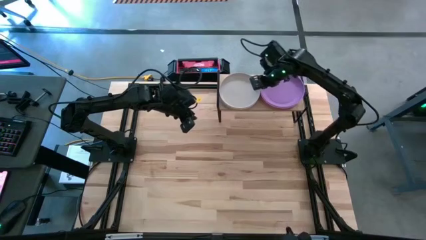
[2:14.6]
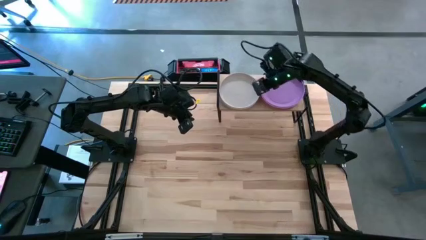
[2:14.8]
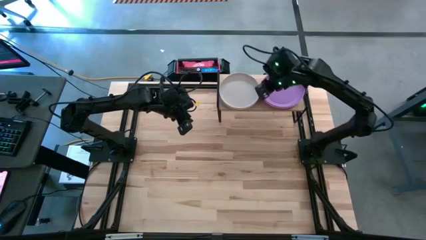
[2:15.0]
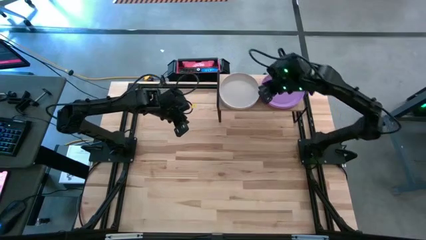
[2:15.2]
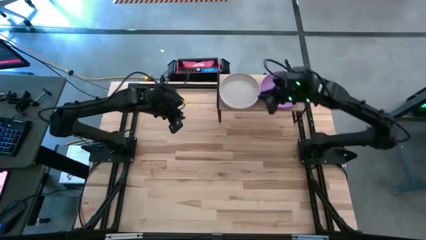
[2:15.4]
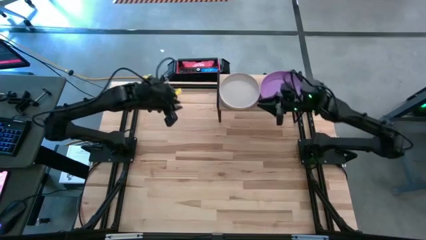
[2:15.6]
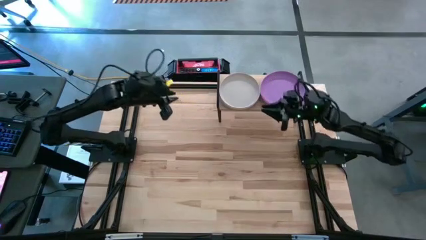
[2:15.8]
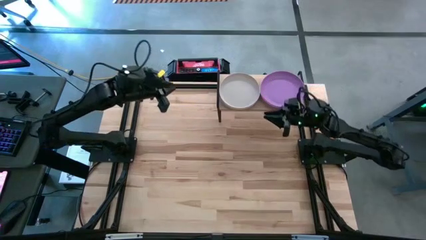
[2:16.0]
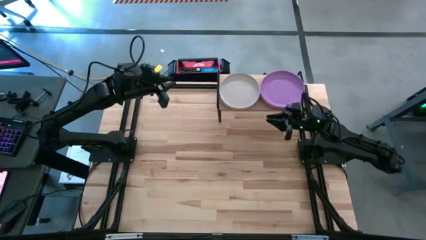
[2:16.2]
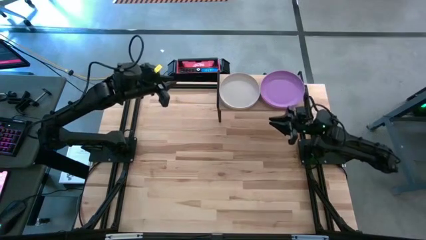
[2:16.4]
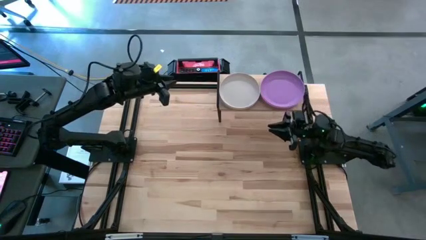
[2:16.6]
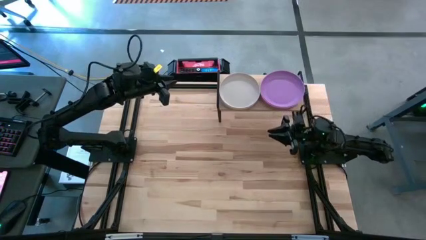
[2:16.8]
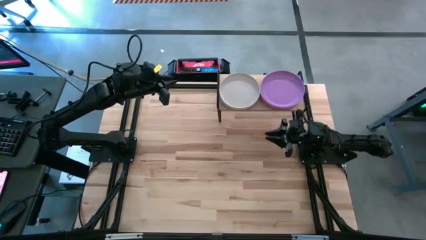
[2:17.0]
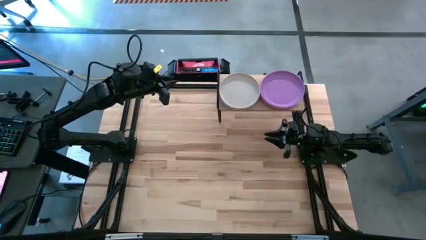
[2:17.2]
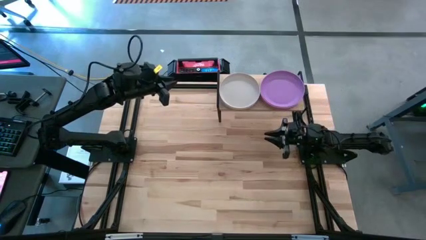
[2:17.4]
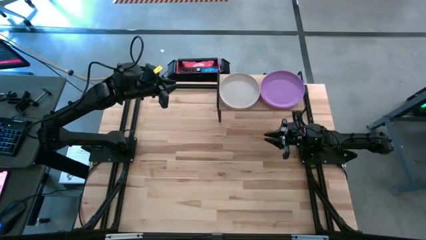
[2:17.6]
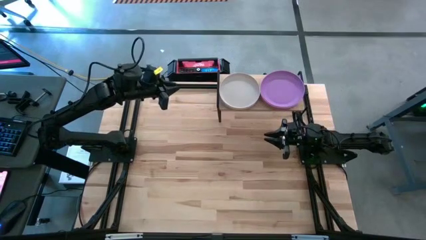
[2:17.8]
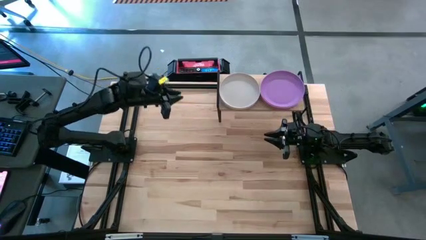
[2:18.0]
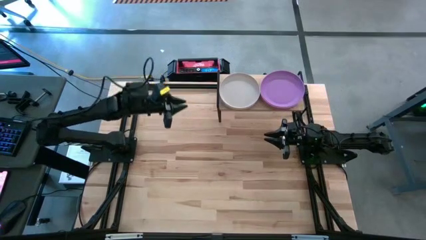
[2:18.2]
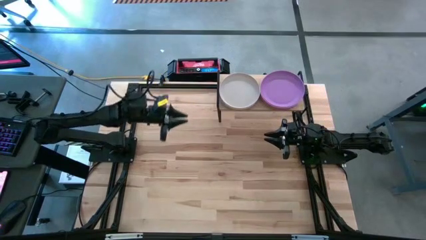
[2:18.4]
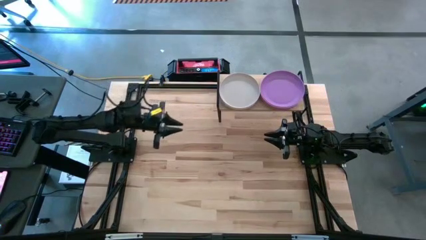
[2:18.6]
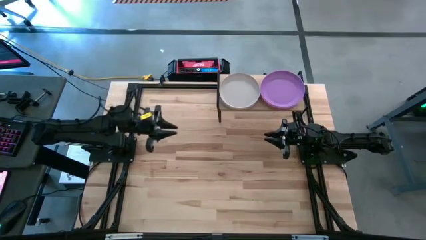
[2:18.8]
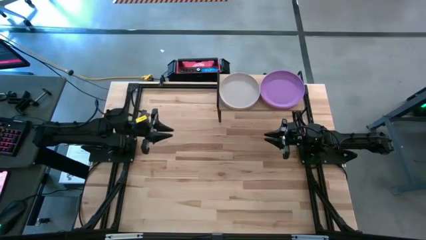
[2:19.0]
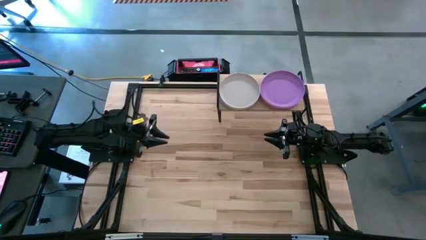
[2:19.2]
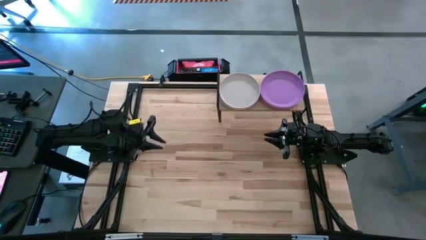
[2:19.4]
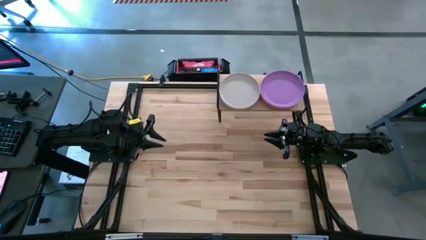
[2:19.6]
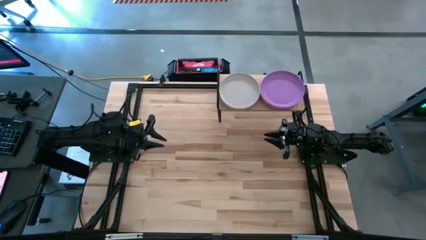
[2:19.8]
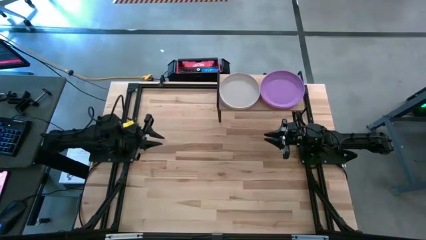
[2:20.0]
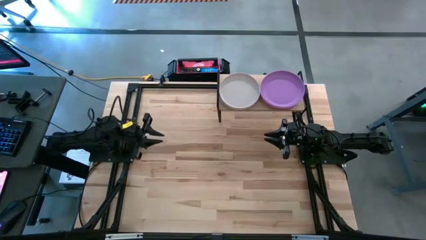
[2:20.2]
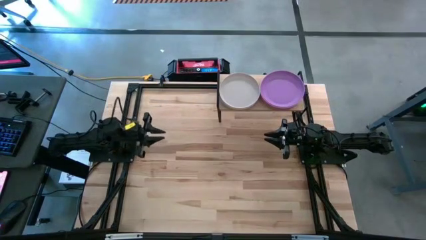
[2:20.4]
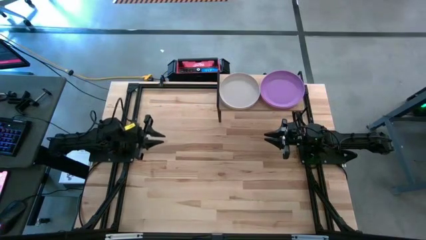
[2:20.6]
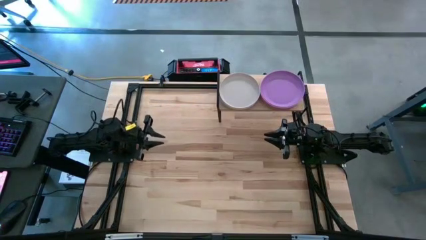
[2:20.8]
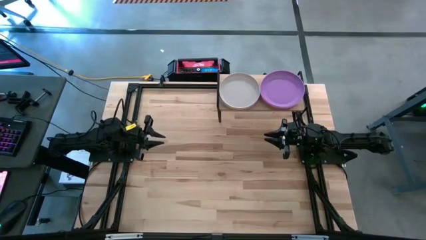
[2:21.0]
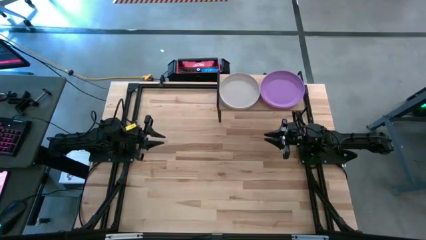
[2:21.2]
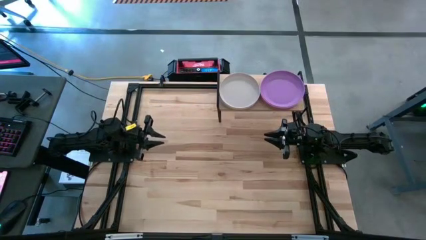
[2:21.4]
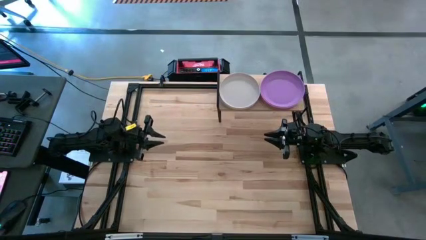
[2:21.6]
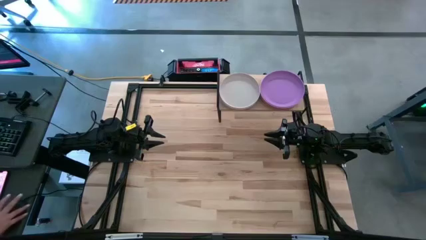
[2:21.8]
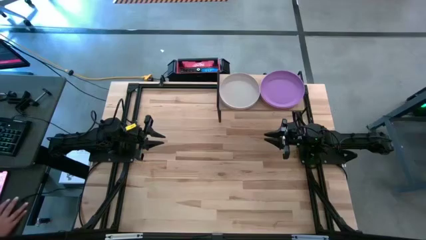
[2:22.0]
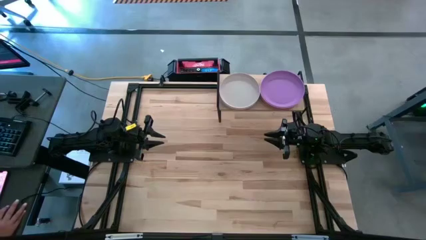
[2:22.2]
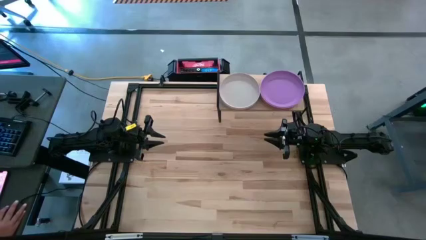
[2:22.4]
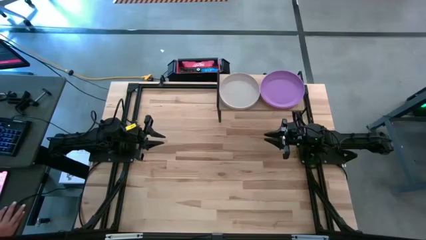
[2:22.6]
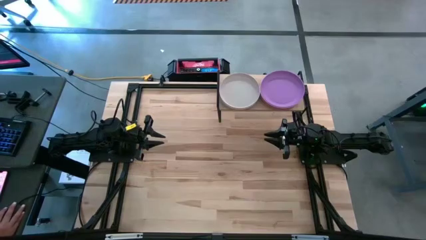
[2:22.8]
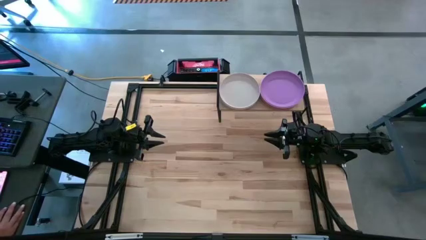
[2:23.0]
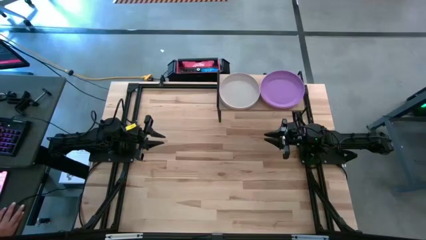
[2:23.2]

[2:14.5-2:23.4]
Task: Place and stack plates onto a shelf
Return to Home Position
